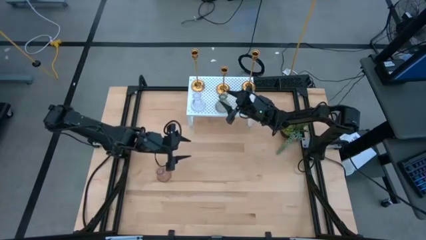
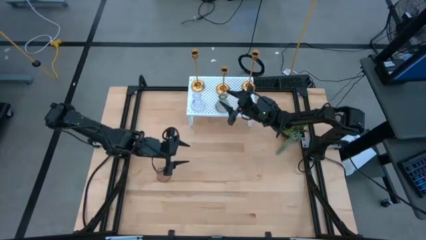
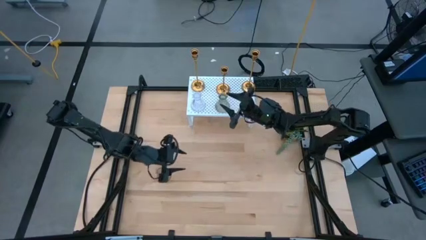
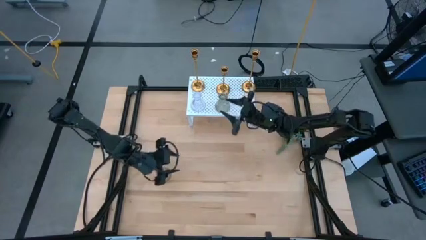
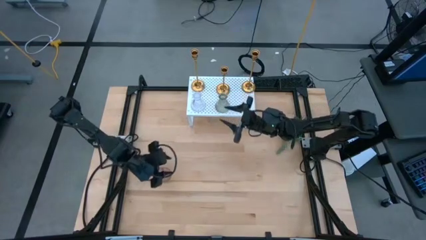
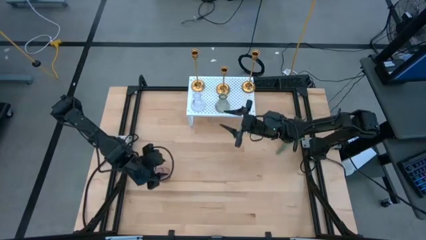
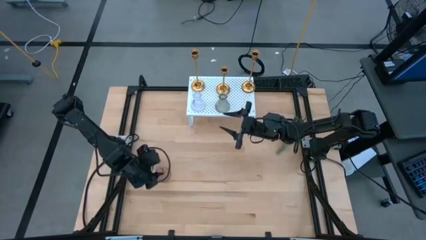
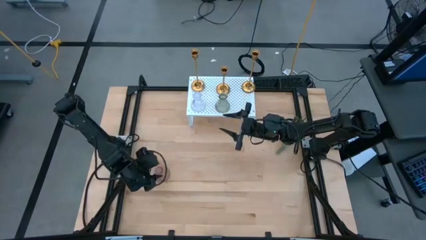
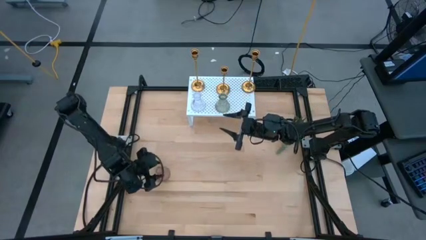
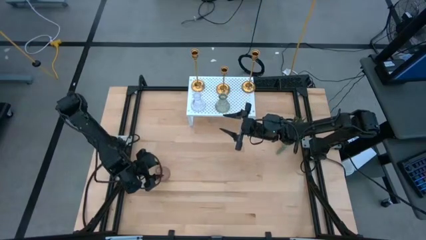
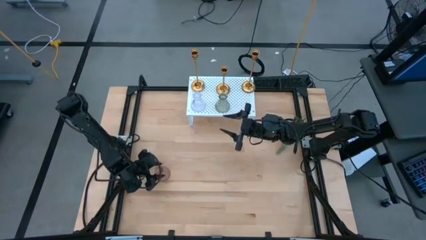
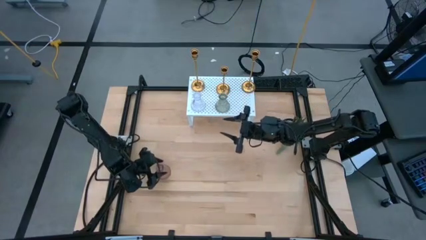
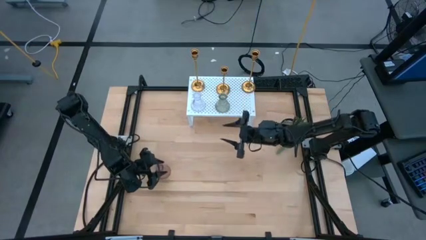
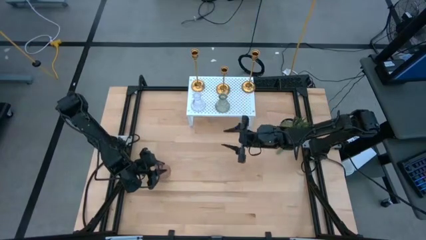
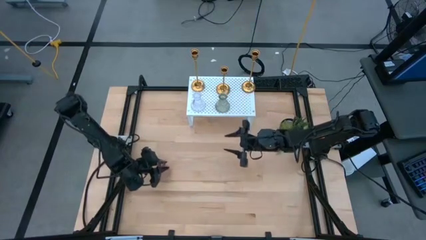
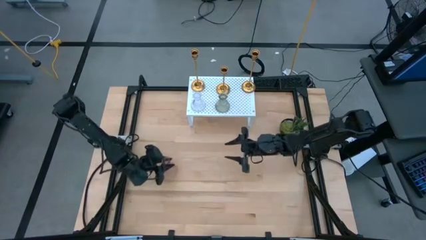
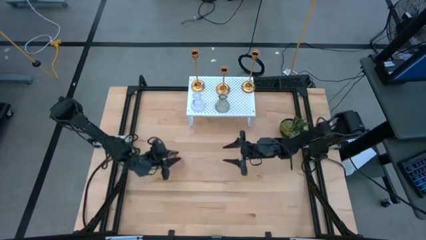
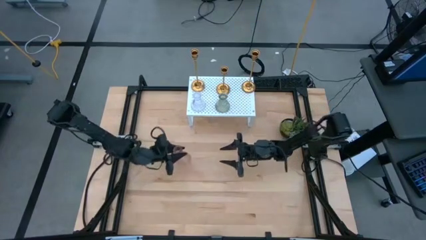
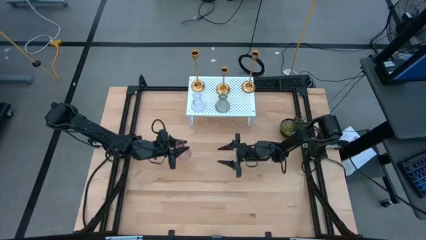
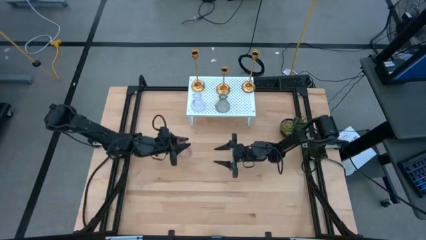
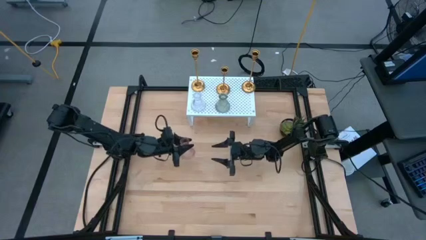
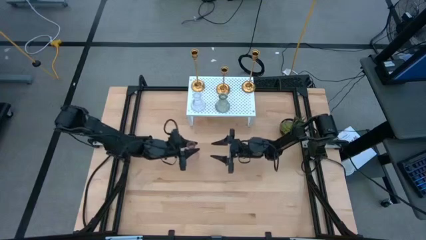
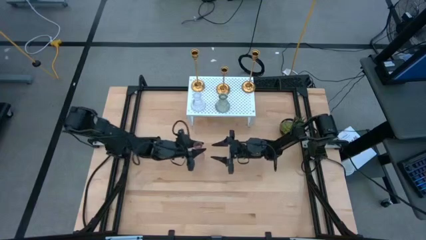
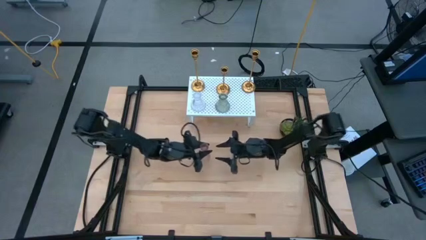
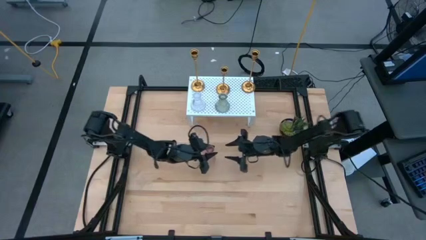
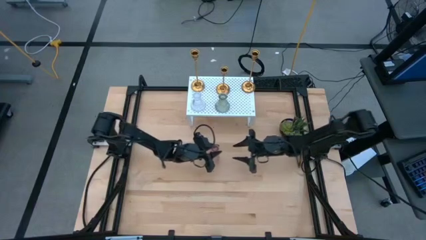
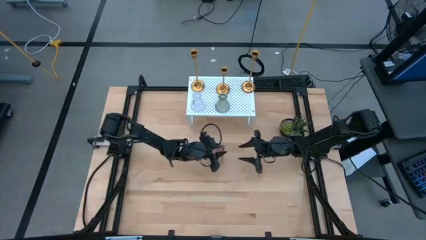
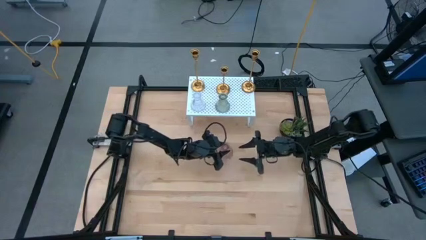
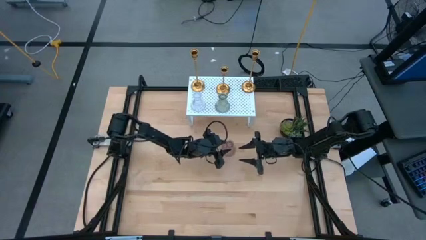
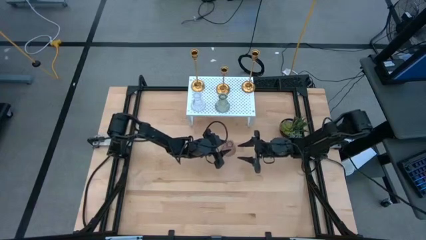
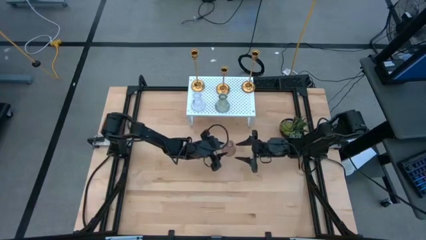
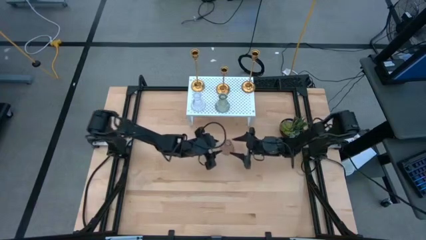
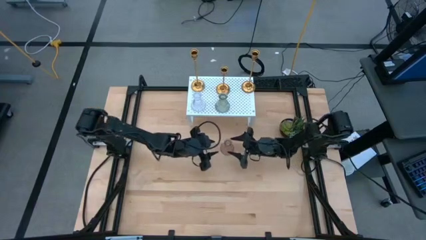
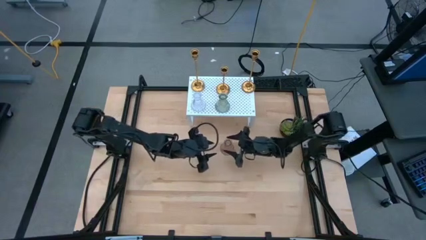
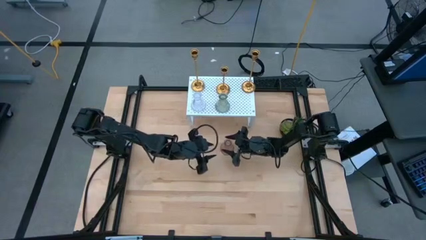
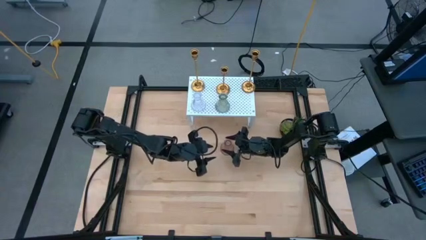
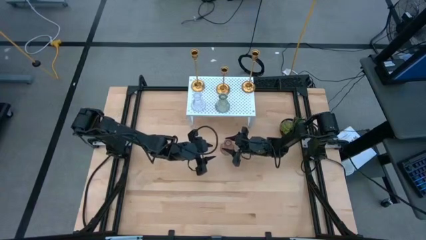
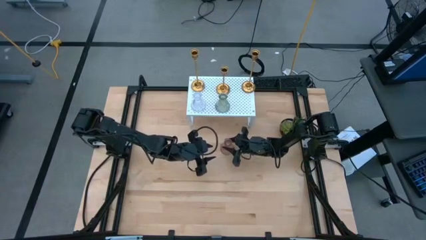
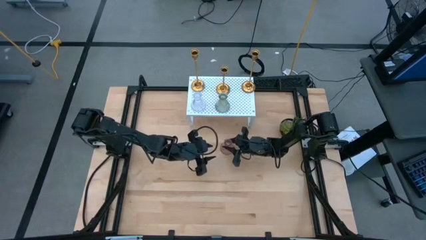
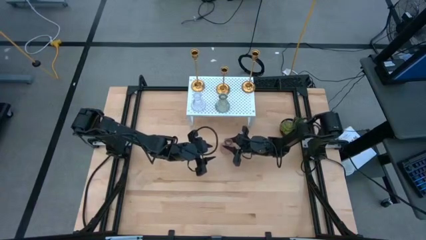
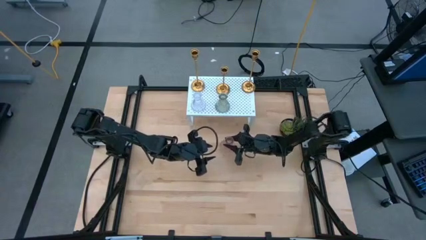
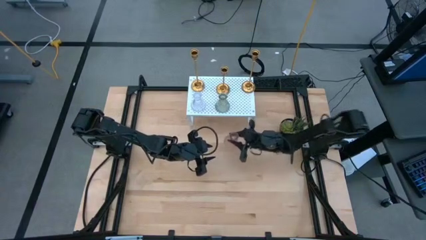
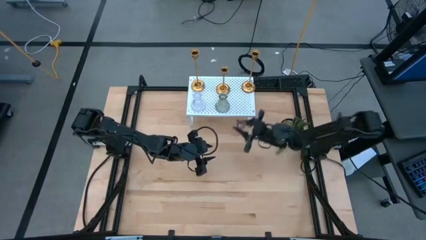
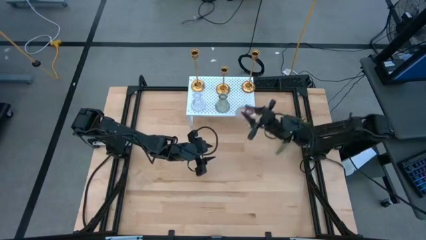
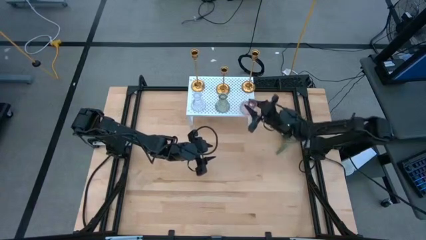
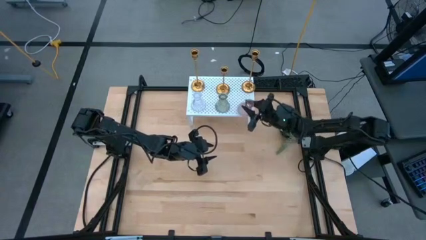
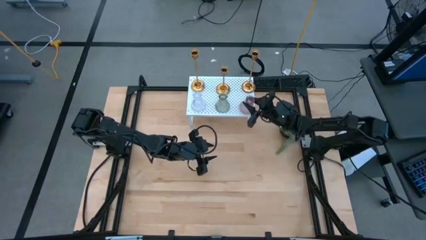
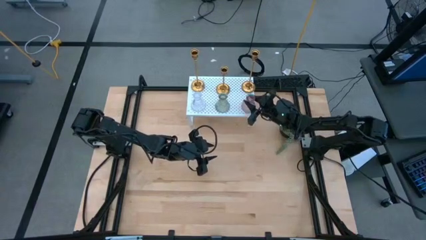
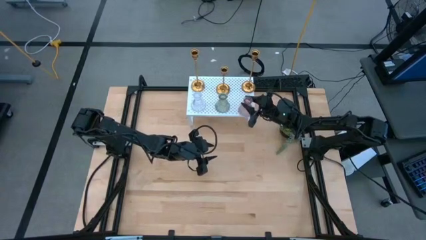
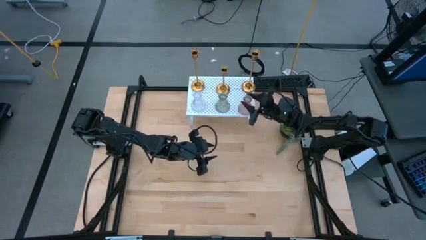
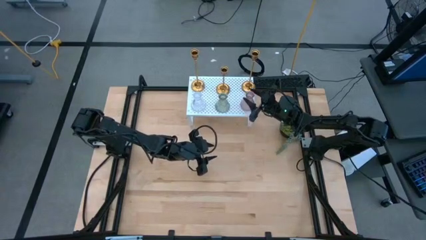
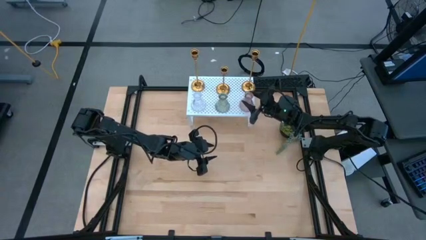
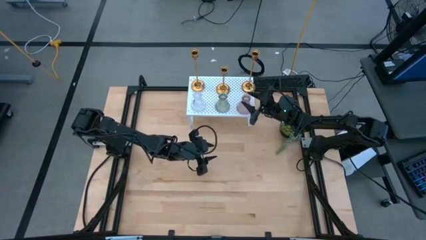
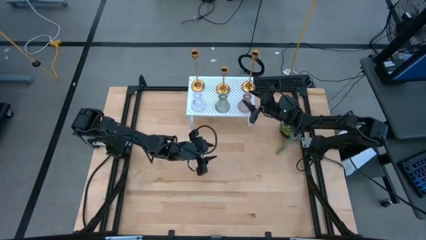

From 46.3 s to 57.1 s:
Task: Pick & Place candle stick holders
Put the pink glass candle holder on the shelf aligned with the other glass candle holders

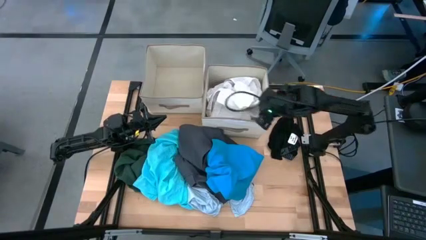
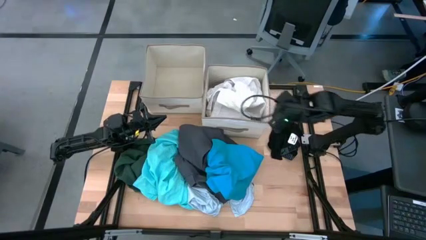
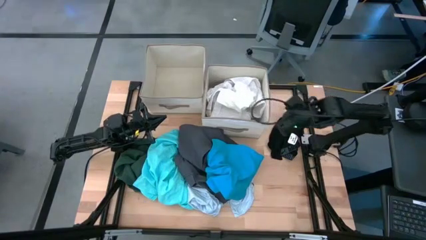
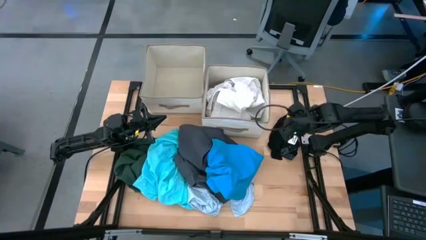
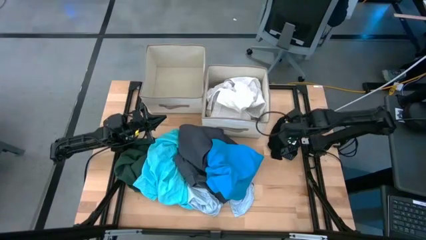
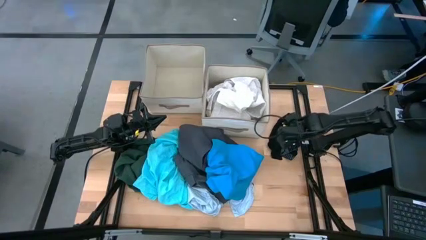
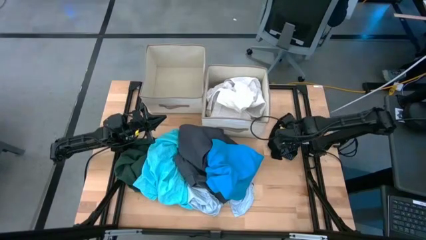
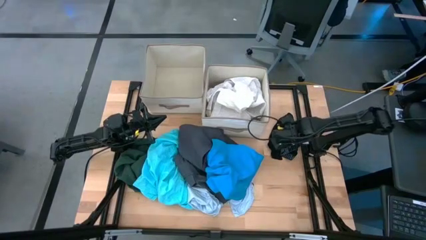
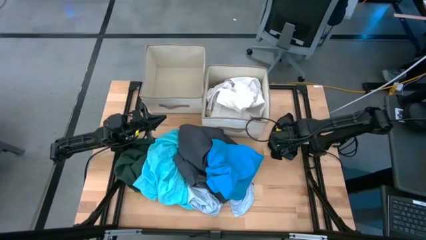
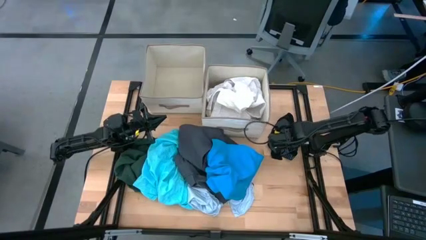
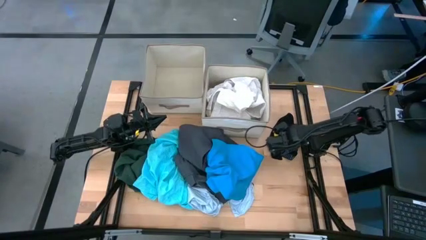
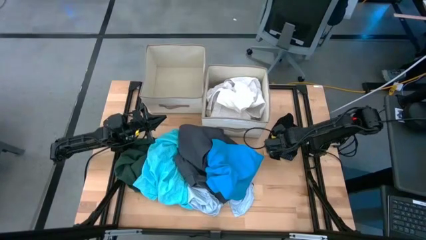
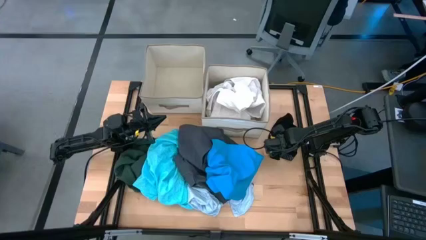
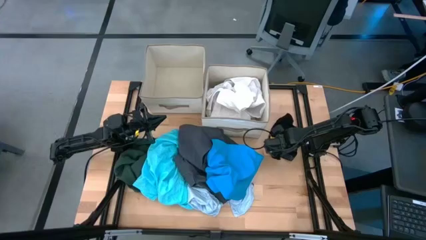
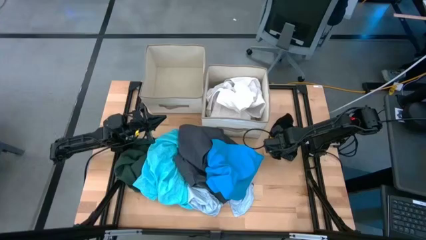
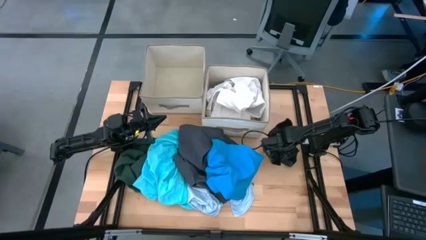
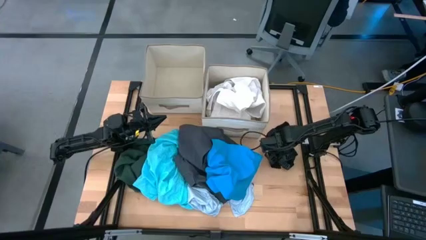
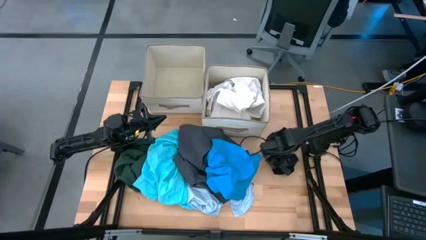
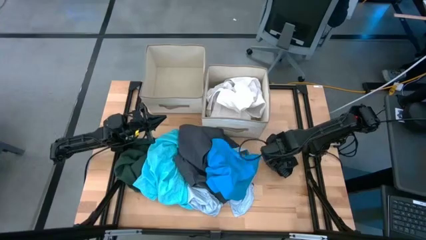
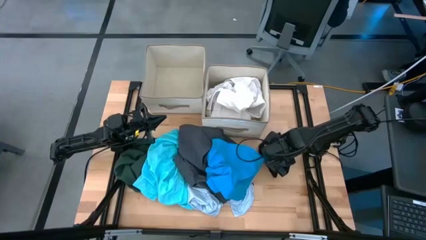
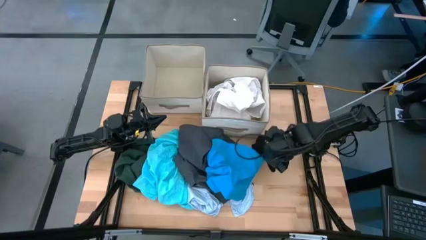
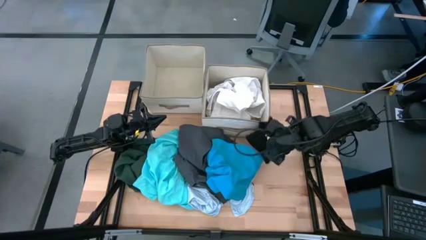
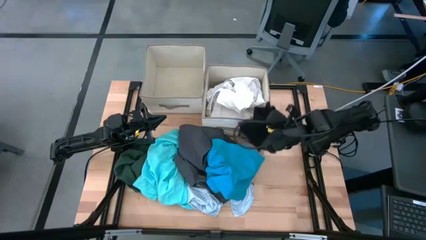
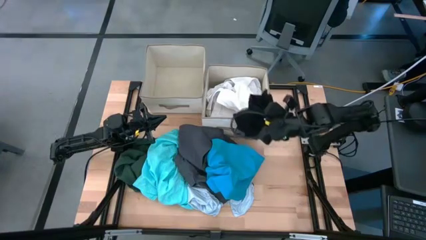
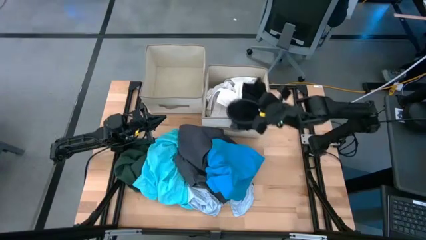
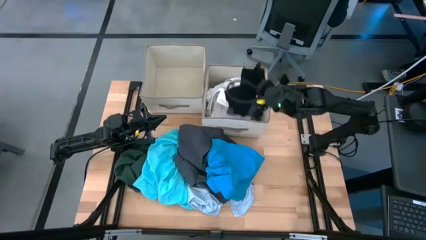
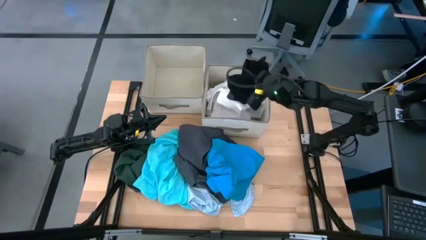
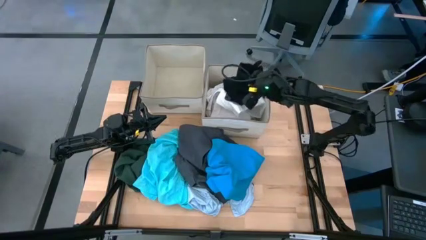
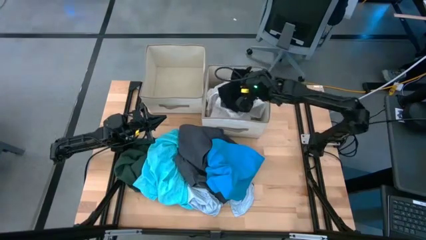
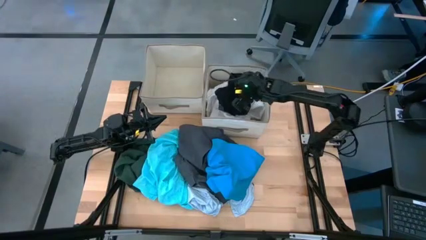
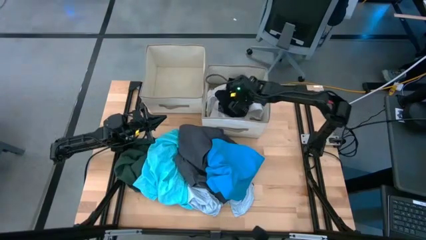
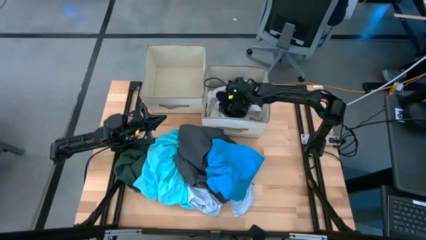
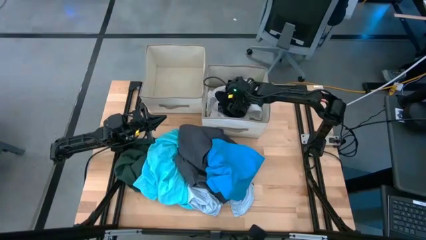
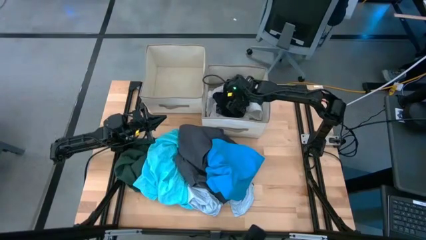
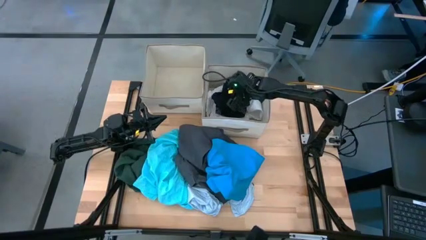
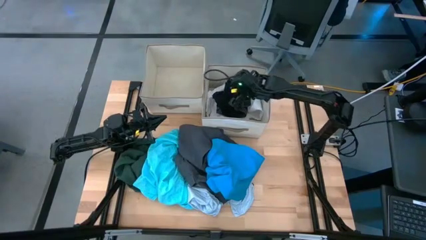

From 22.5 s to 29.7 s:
Task: Sort clothes
Put the black boxer shorts into the right laundry organizer
